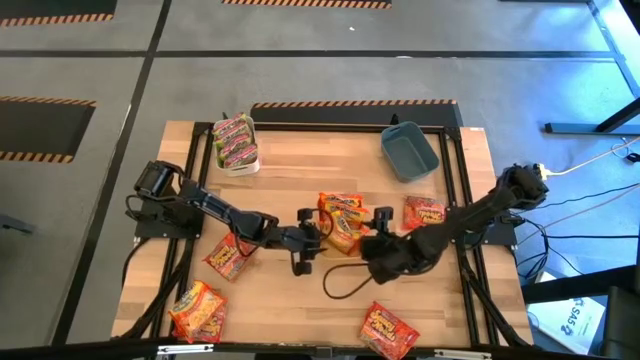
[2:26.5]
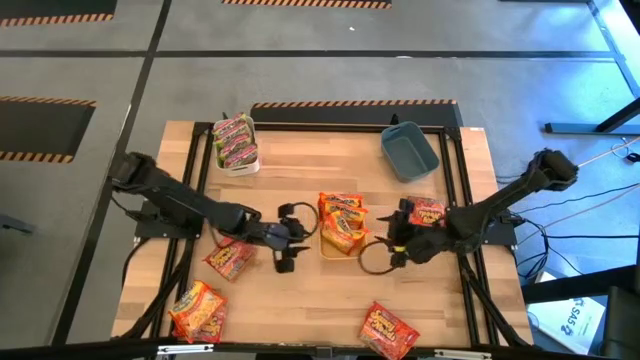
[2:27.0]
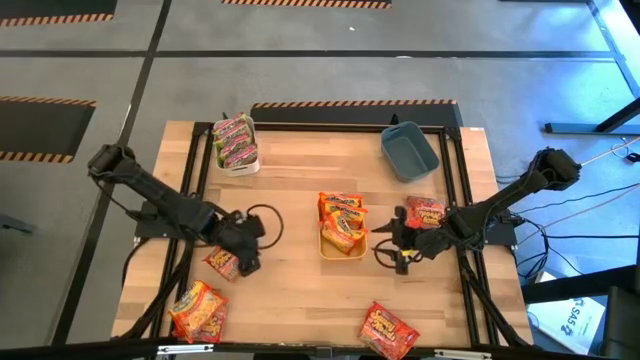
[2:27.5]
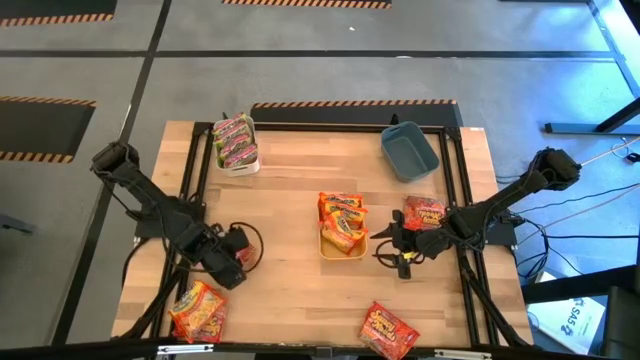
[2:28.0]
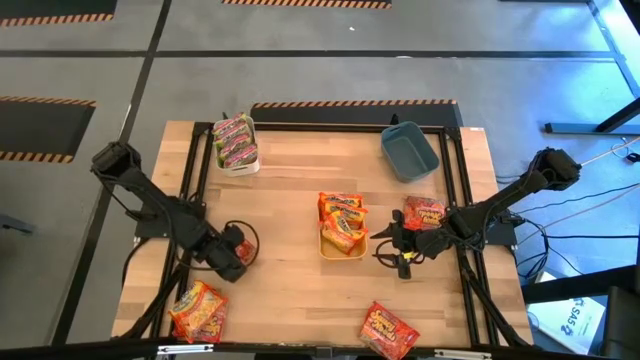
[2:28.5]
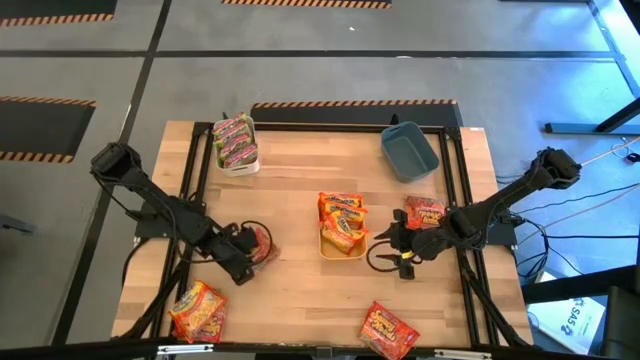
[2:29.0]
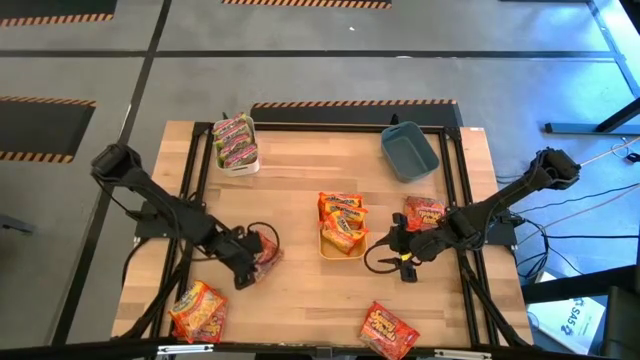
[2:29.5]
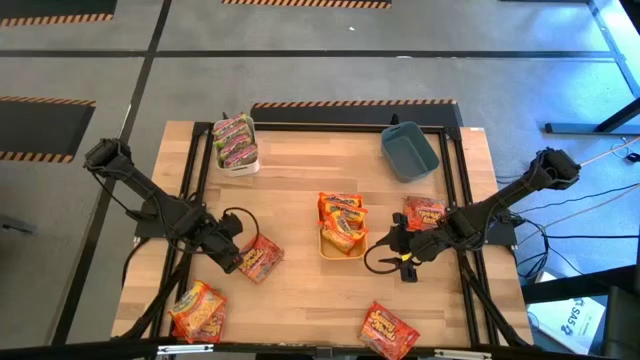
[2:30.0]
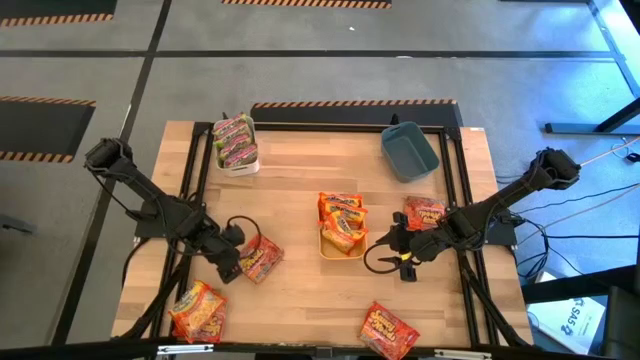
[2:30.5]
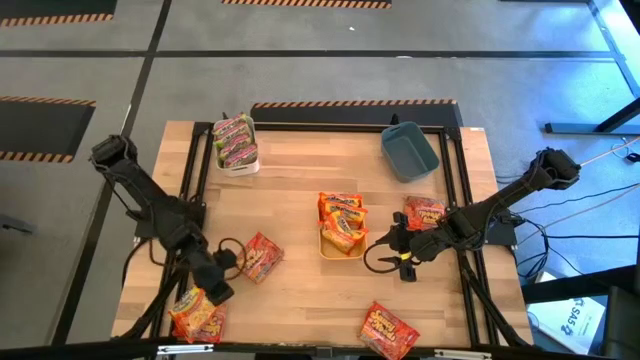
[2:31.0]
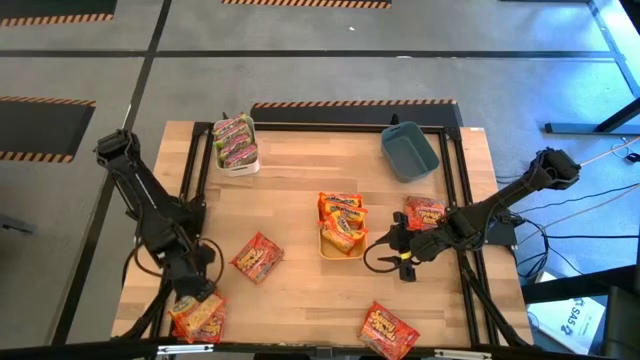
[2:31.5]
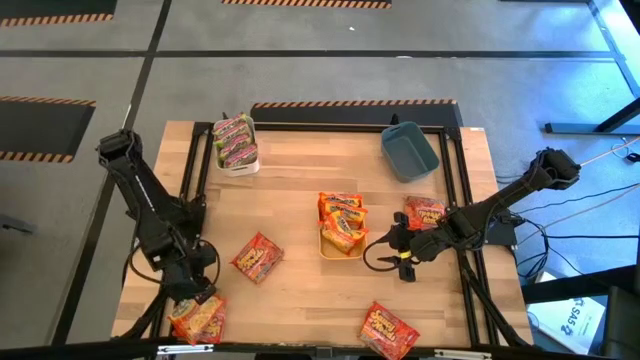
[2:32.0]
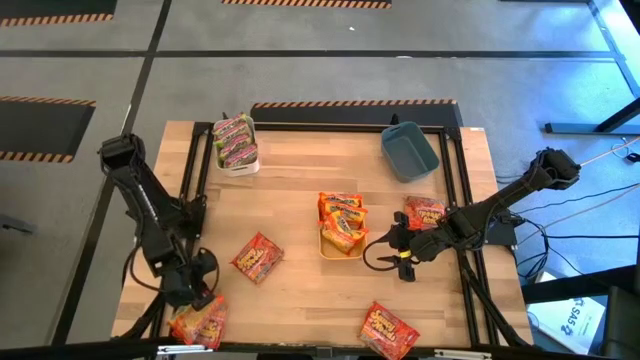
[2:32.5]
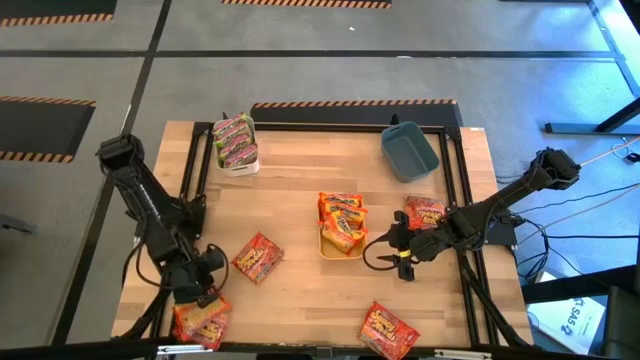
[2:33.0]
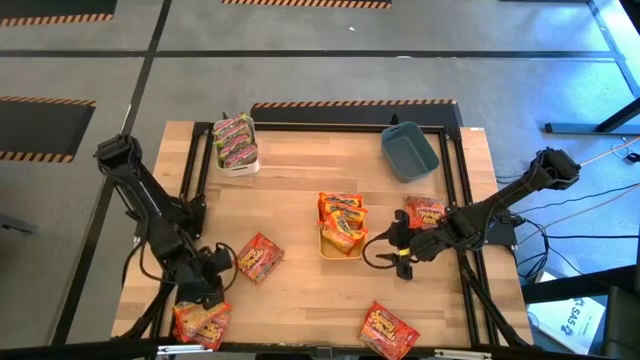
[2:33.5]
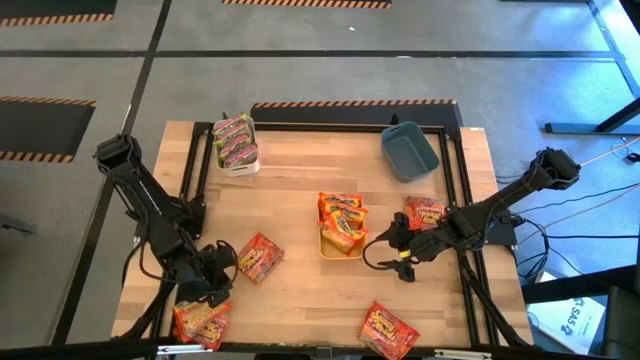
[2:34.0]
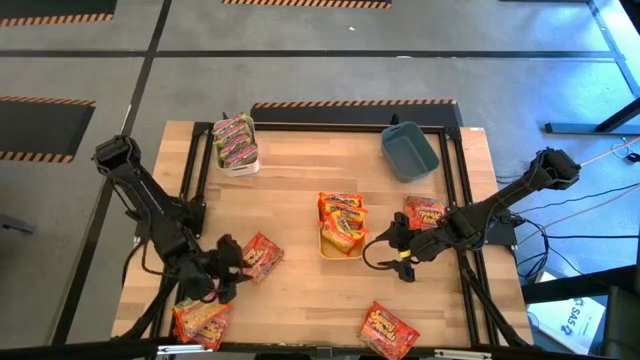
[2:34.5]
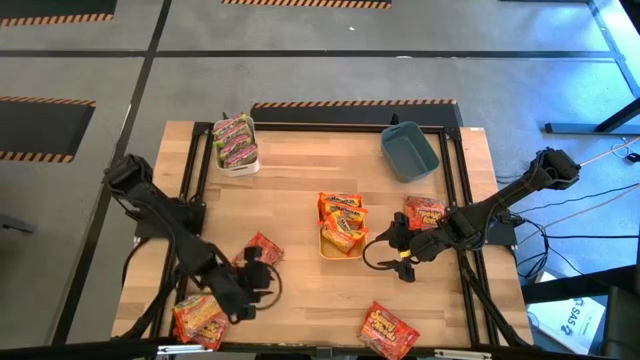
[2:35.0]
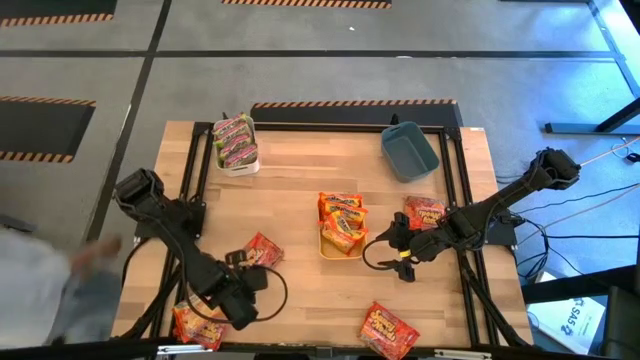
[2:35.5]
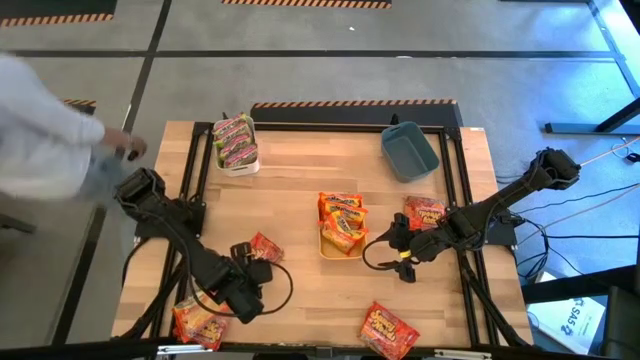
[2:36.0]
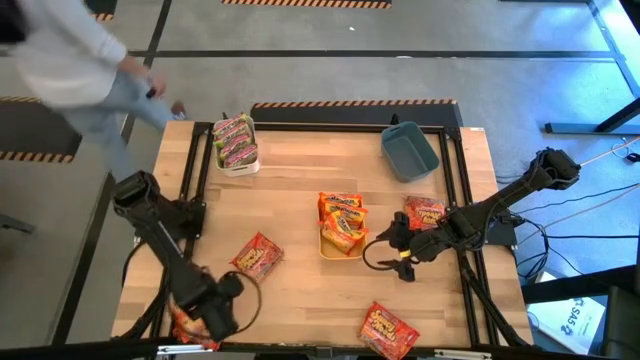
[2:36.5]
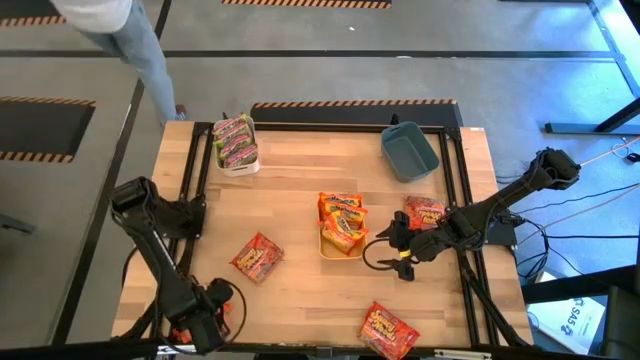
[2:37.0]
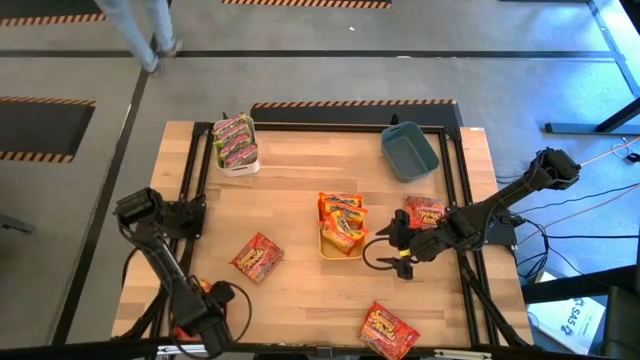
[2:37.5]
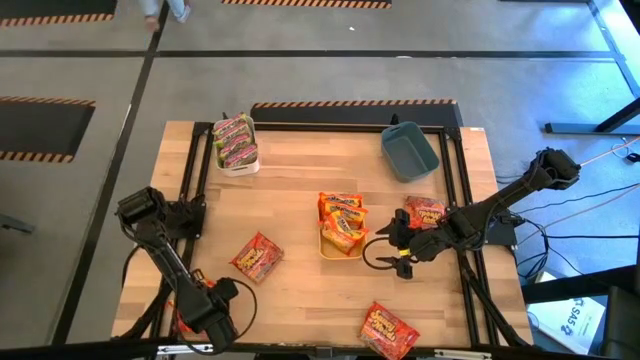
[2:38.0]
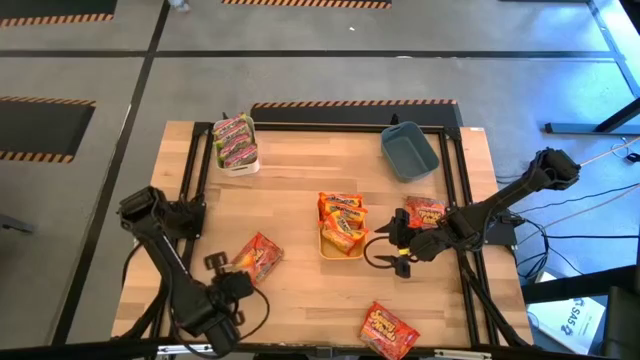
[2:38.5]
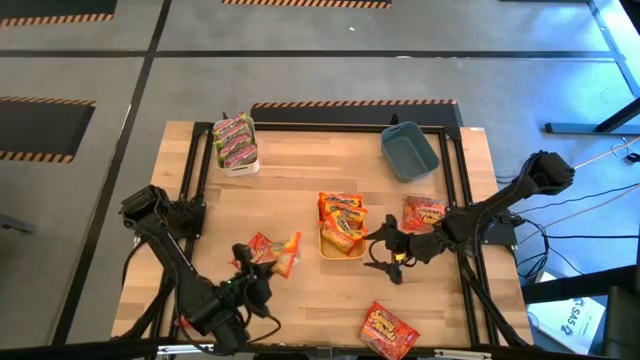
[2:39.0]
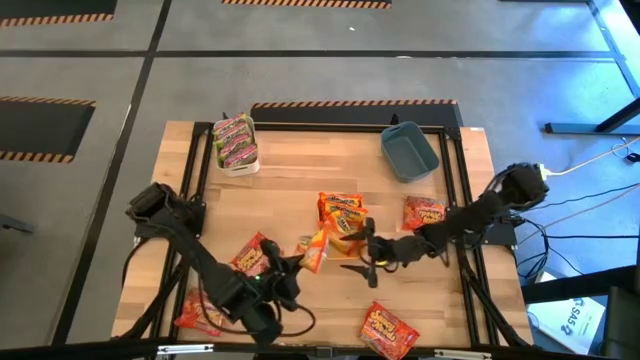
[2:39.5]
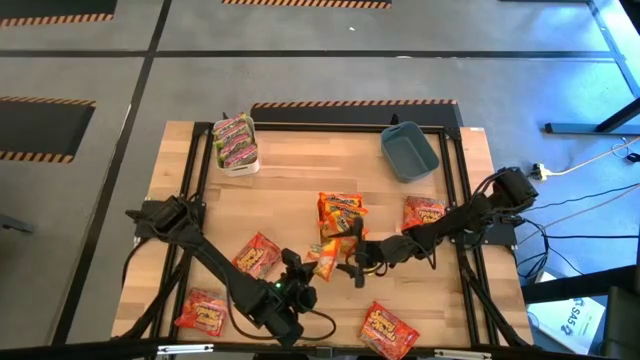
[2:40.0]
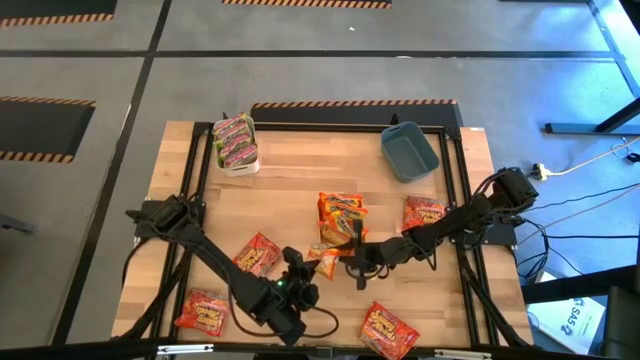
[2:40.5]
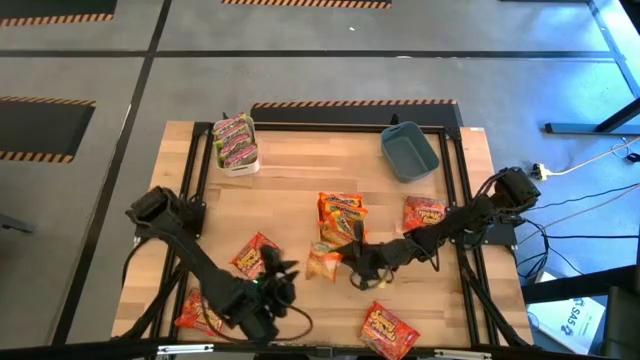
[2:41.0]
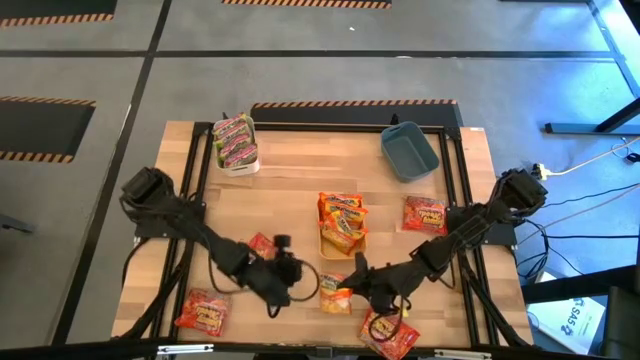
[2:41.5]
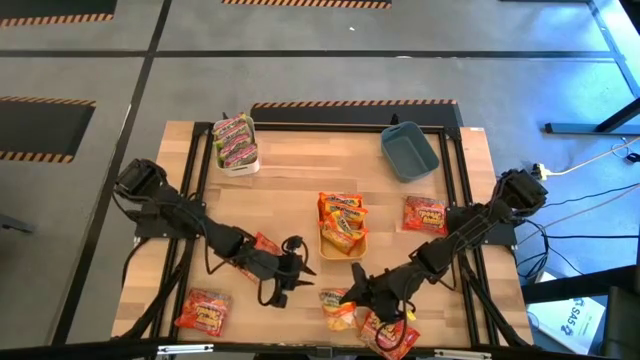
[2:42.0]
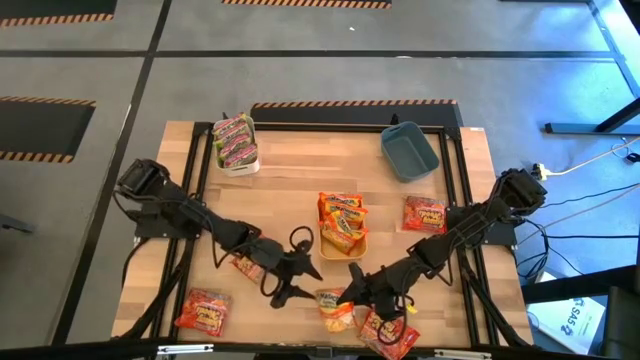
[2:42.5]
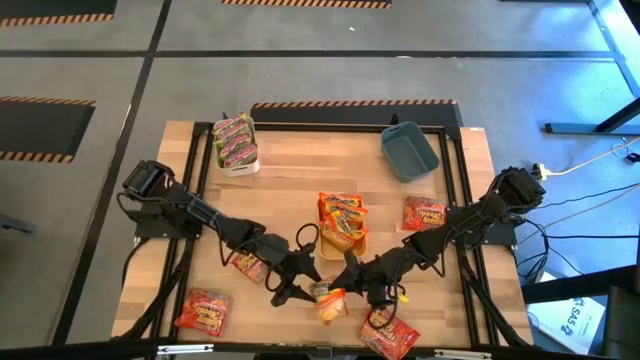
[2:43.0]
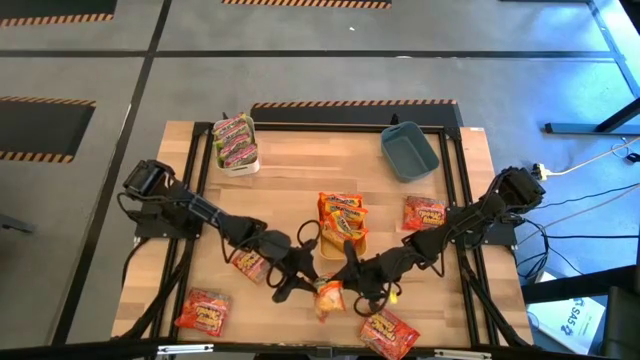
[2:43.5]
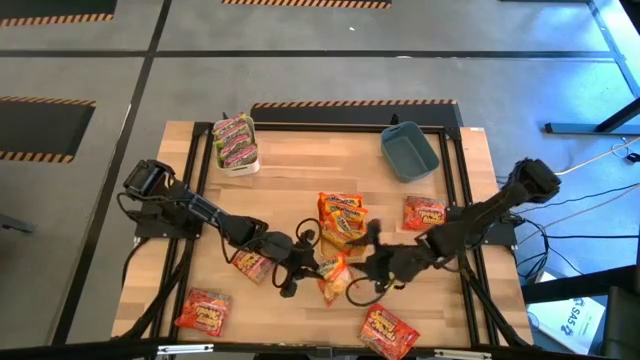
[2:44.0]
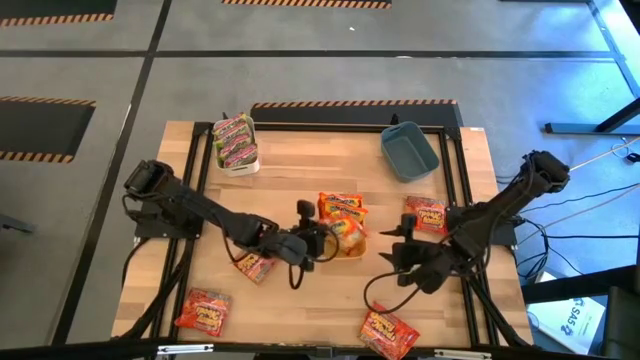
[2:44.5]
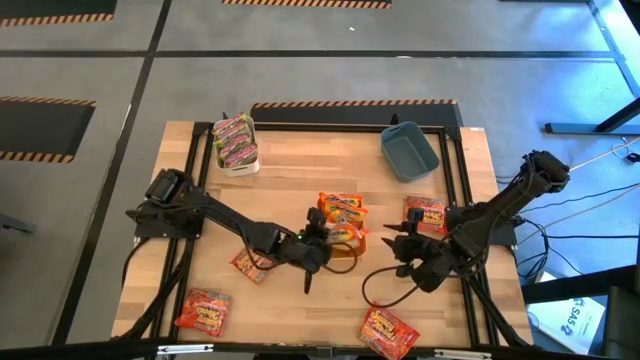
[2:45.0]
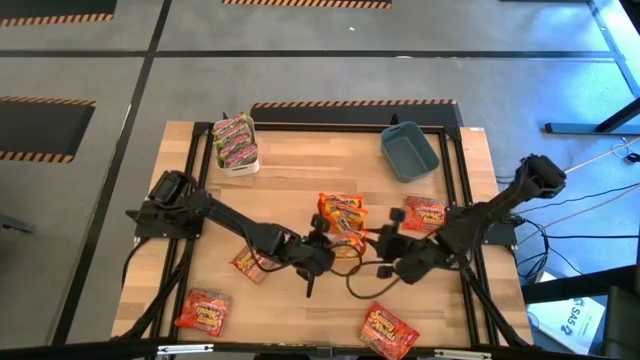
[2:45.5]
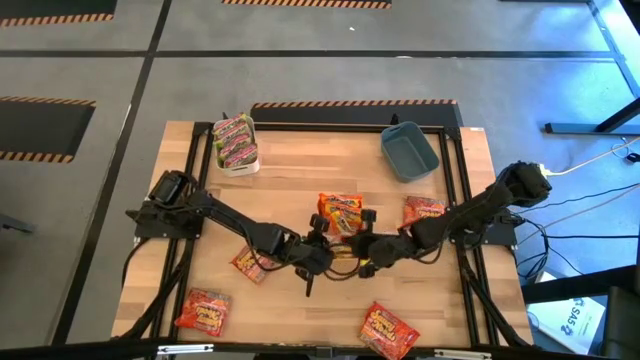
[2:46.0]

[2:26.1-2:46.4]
Task: Sort Maruchan noodles
Put the orange noodle pack into the yellow bin

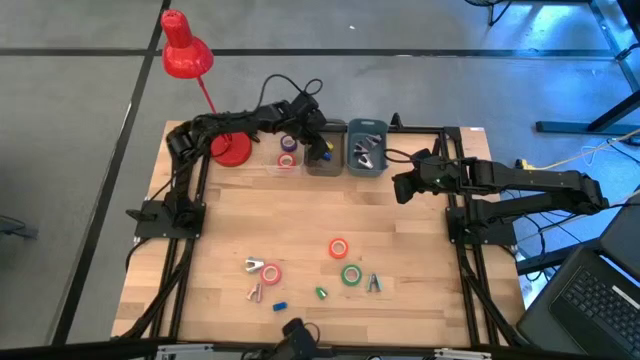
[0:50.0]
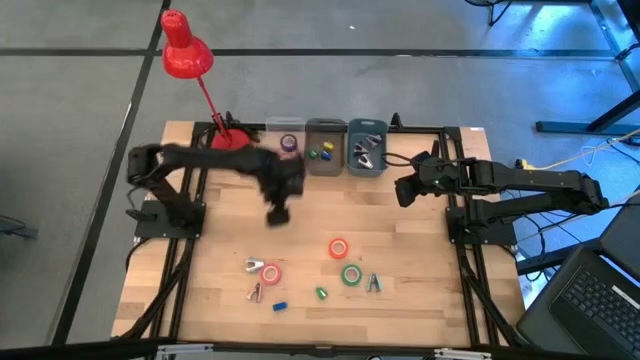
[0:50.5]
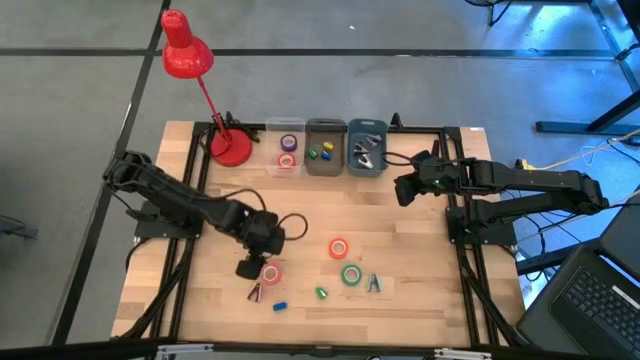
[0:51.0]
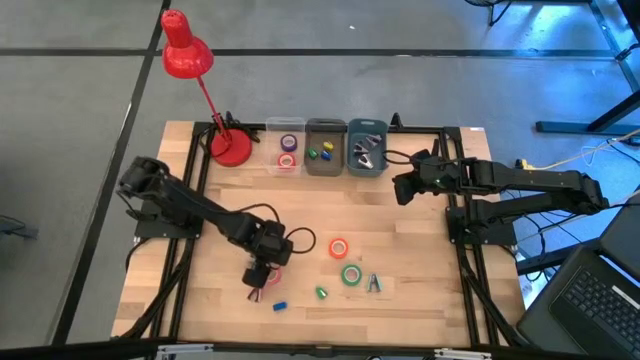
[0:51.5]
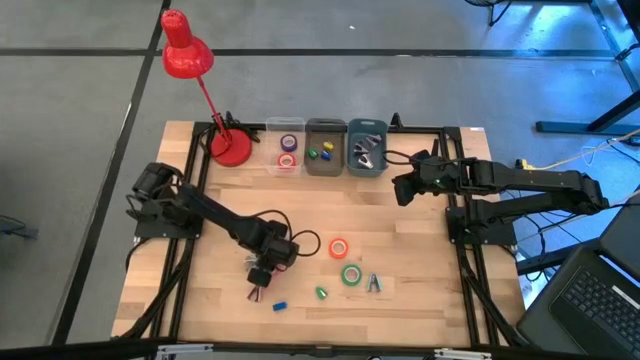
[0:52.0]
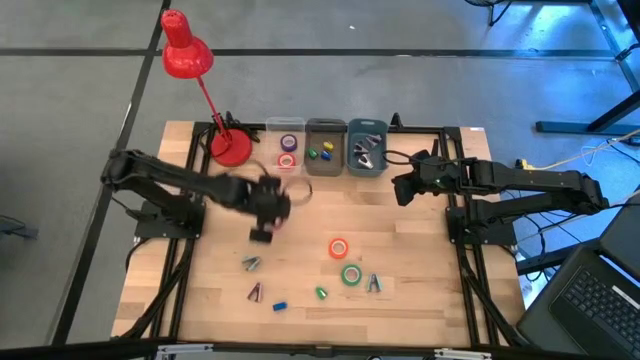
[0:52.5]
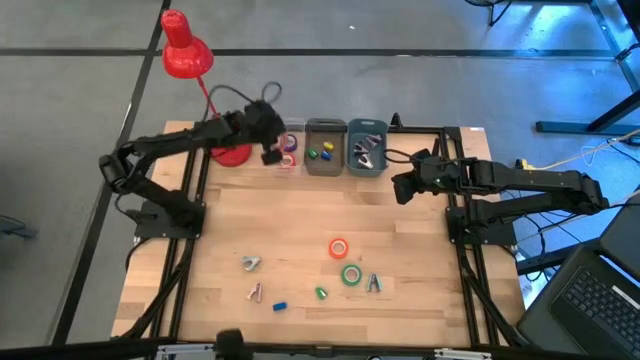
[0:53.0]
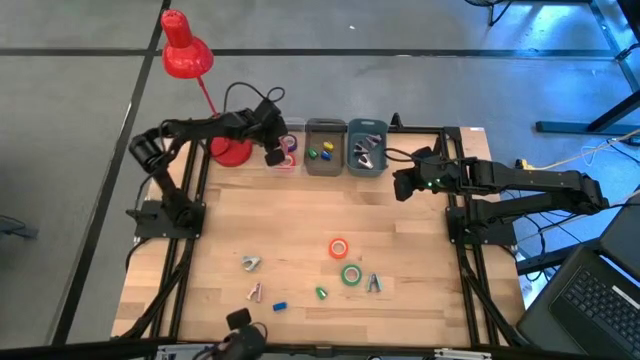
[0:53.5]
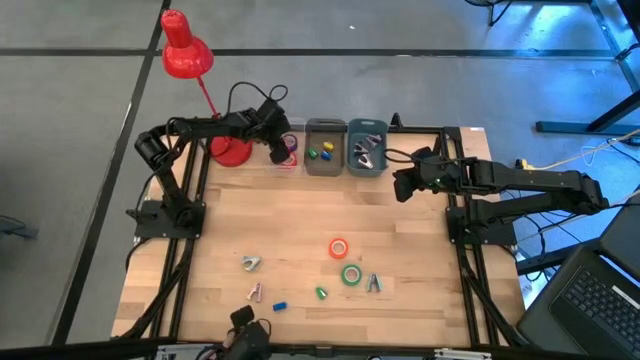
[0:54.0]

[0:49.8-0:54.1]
Task: Pick and place Stapler, Stapler remover, tape
Put the pink tape into the transparent bin
